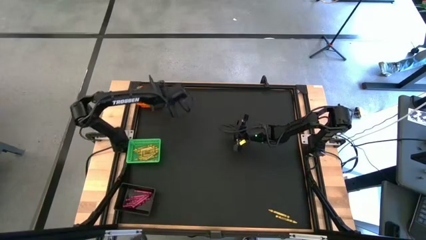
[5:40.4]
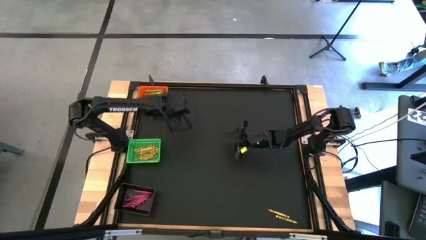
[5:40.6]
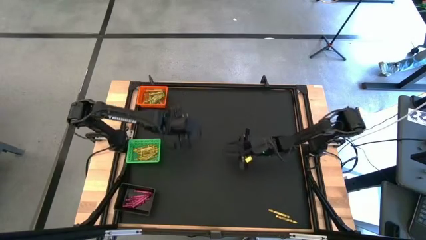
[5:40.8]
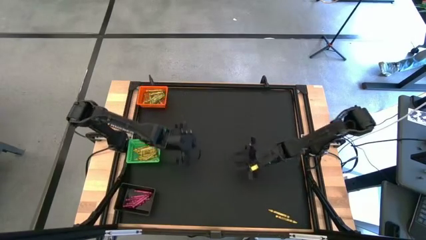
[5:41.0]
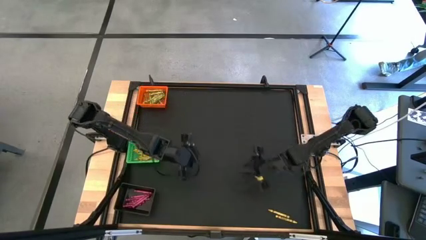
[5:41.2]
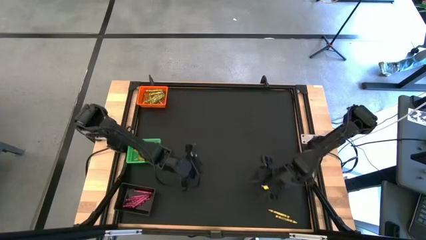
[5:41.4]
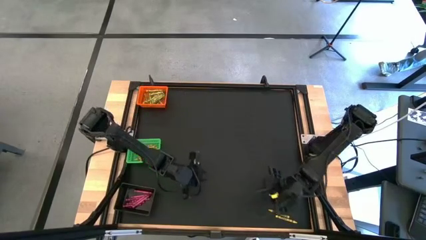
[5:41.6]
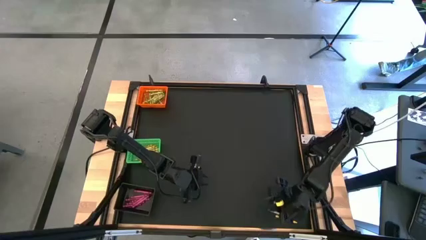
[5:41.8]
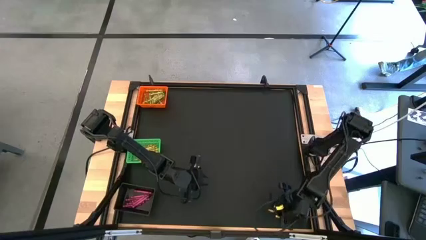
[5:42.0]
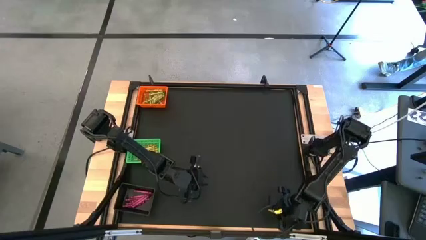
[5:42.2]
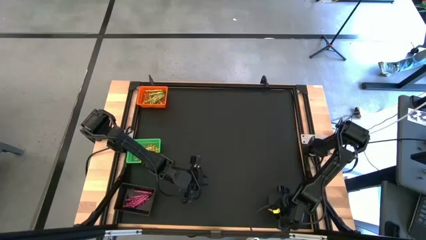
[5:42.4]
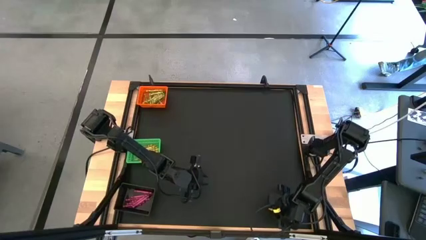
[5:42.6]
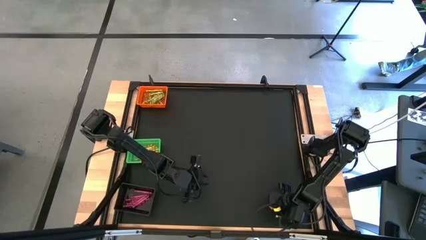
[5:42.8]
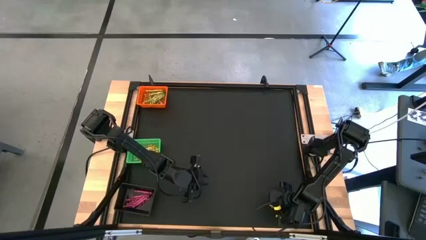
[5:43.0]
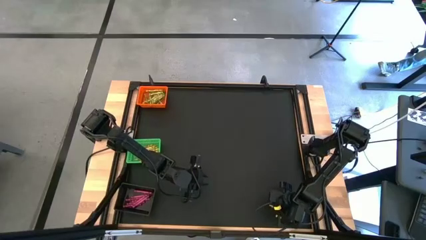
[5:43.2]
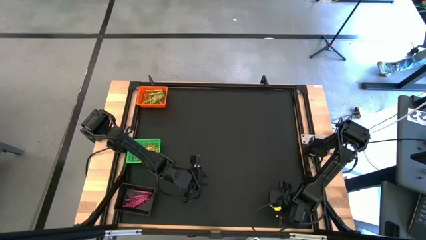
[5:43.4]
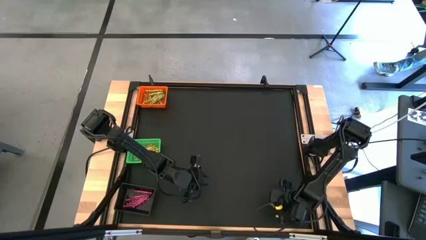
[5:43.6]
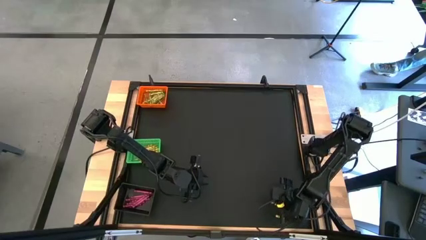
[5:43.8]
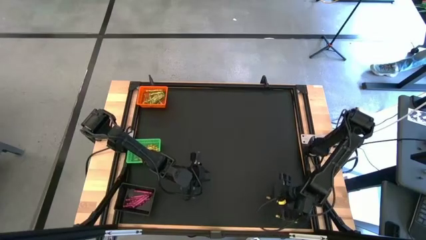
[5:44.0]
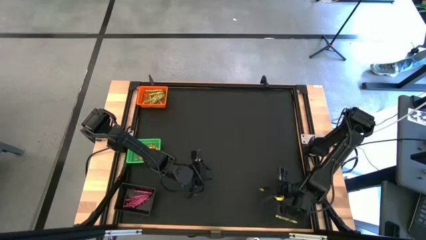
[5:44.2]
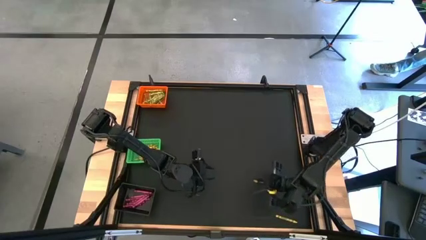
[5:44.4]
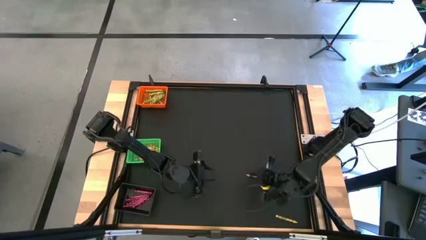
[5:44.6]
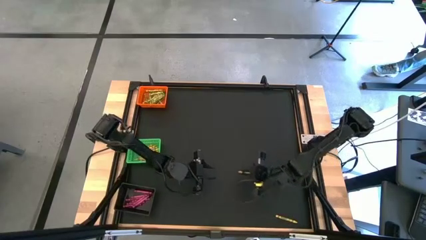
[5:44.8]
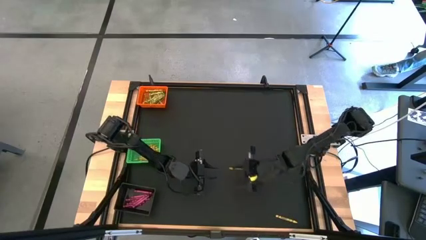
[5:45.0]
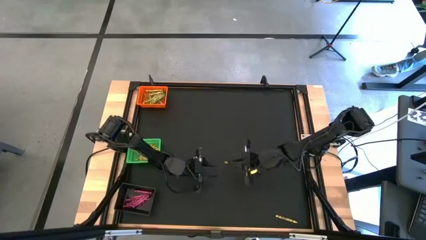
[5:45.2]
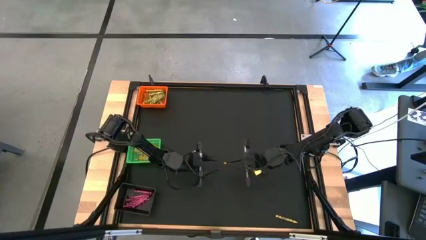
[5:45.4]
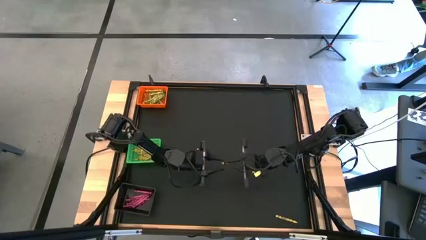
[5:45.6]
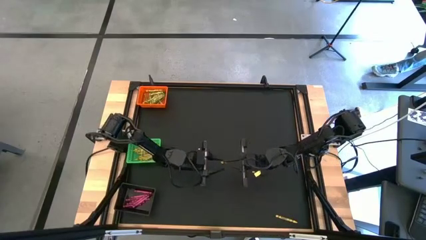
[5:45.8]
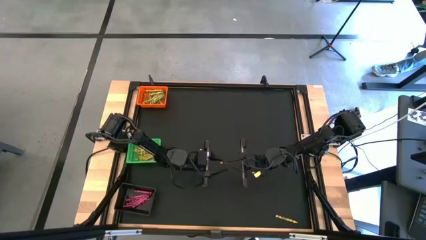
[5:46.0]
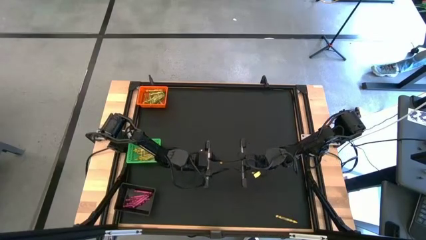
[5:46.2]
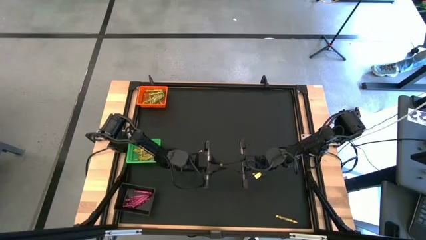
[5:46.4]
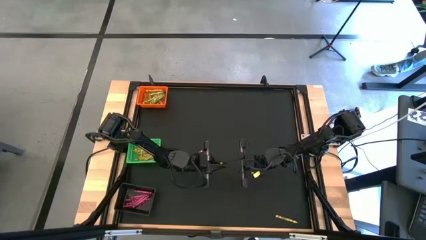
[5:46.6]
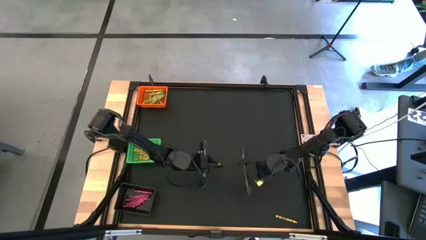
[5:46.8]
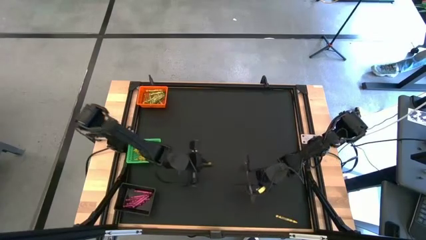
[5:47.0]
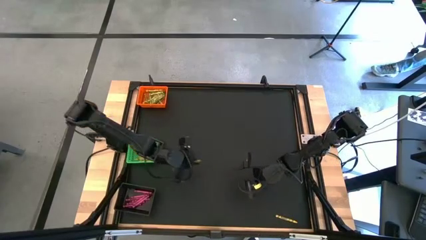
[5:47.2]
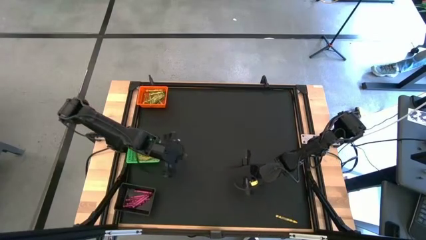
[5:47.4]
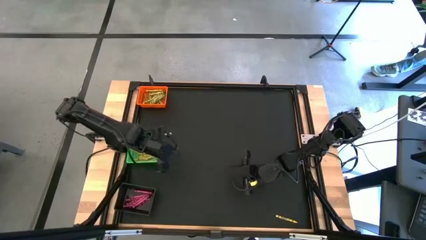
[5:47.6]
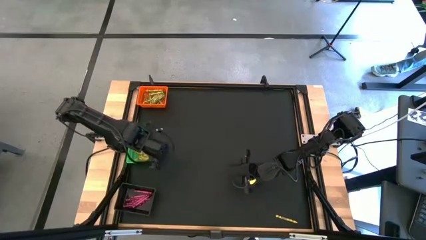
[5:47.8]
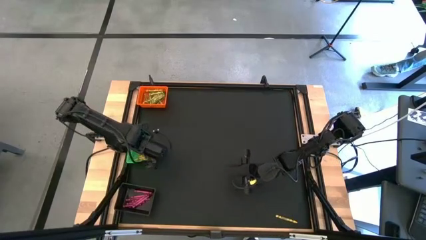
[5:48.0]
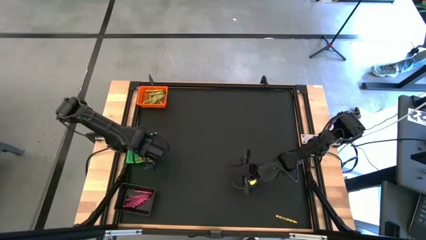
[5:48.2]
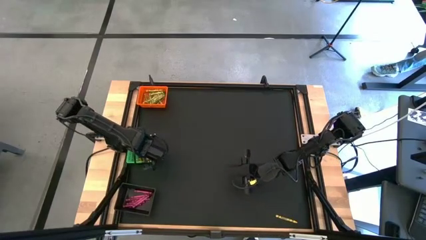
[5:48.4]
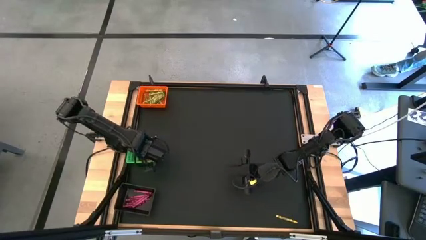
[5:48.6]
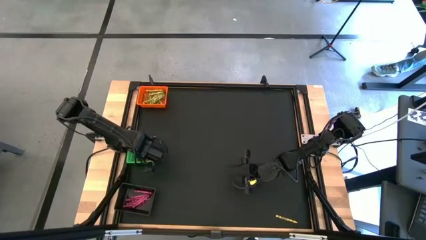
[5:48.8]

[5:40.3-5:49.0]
Task: Sort crayons
Put the yellow crayon into the green bin

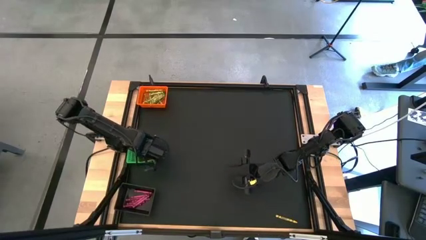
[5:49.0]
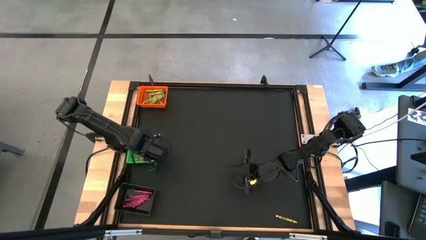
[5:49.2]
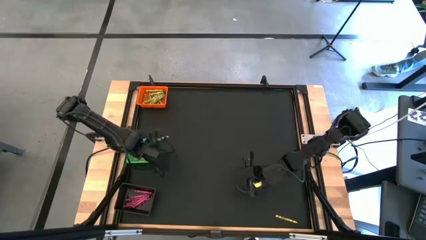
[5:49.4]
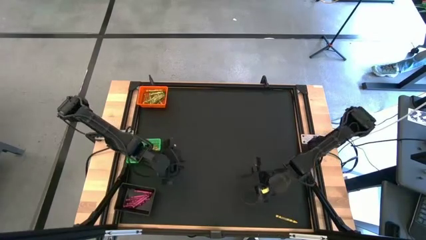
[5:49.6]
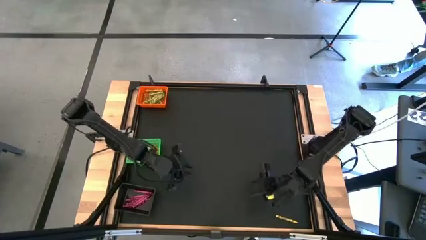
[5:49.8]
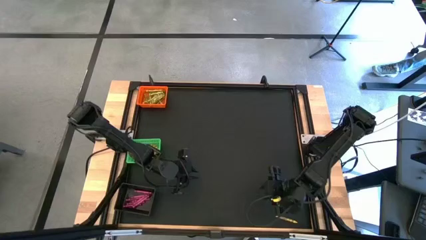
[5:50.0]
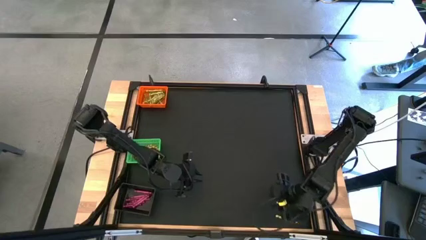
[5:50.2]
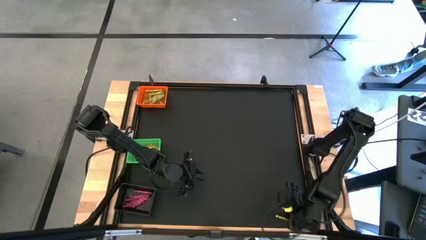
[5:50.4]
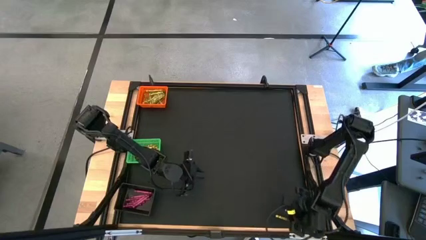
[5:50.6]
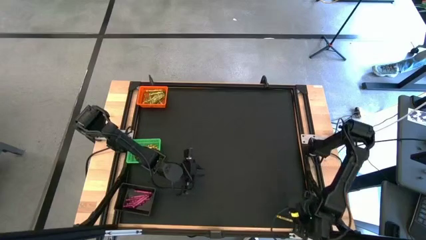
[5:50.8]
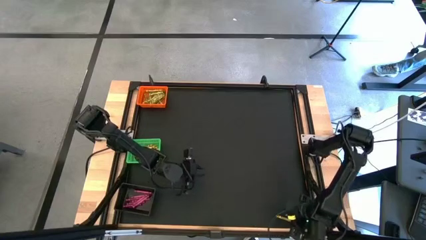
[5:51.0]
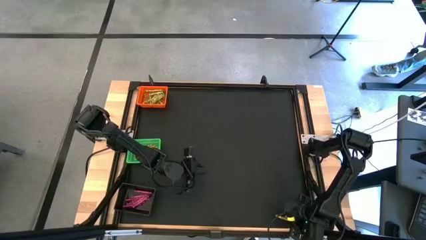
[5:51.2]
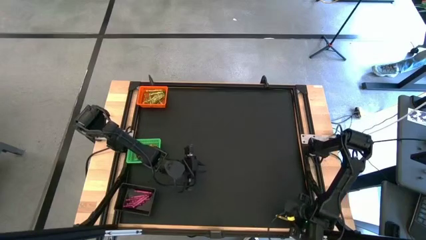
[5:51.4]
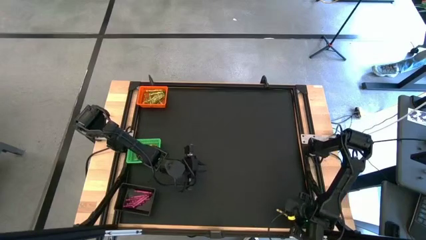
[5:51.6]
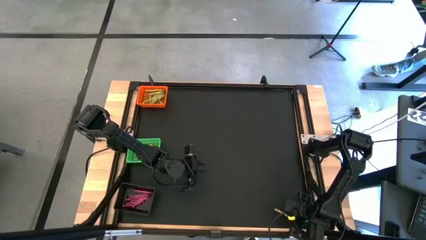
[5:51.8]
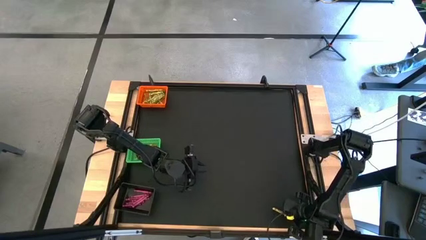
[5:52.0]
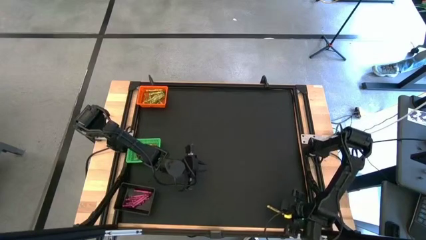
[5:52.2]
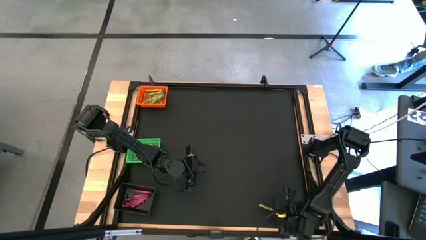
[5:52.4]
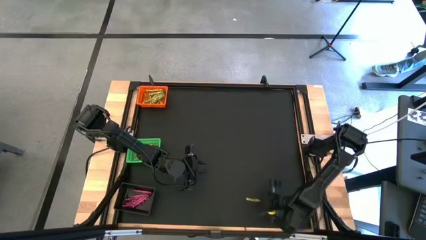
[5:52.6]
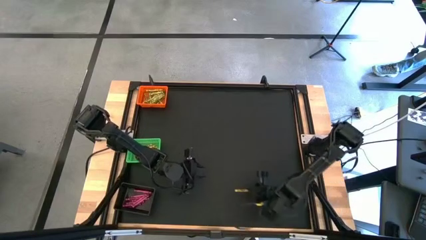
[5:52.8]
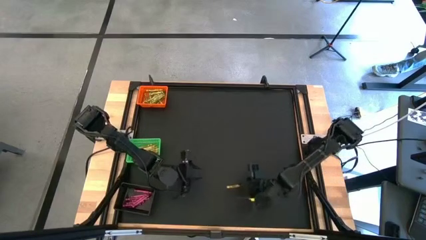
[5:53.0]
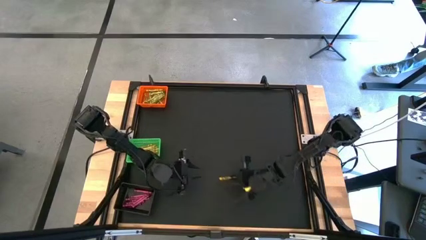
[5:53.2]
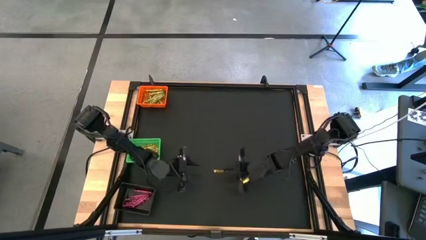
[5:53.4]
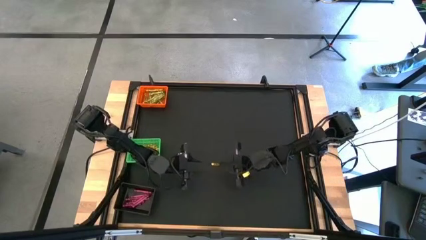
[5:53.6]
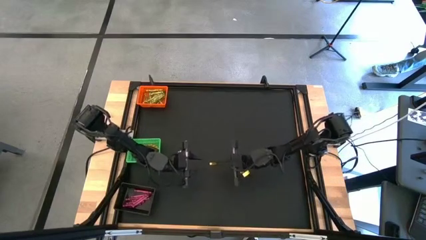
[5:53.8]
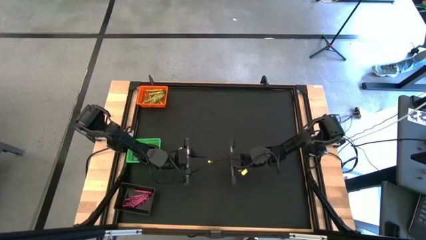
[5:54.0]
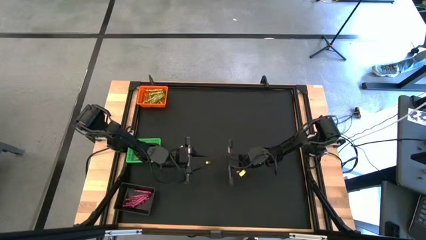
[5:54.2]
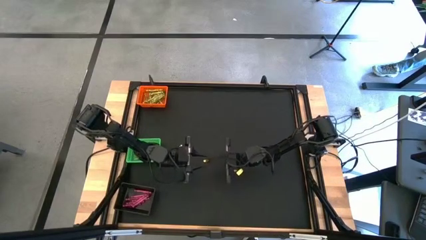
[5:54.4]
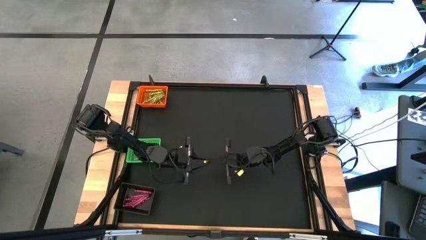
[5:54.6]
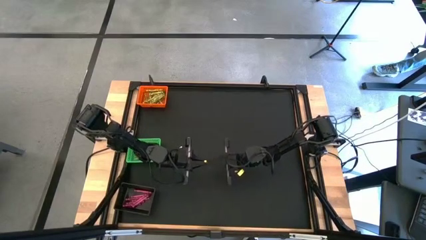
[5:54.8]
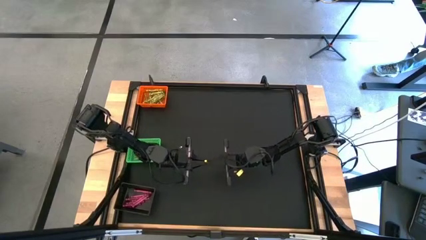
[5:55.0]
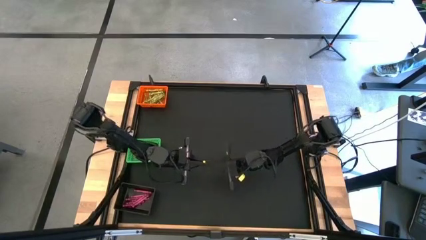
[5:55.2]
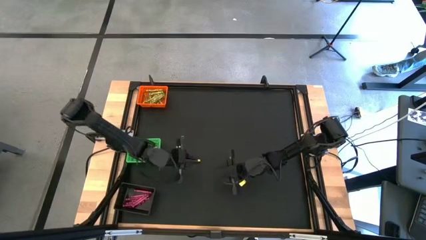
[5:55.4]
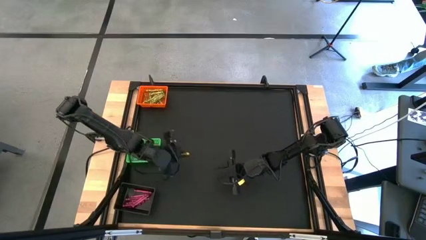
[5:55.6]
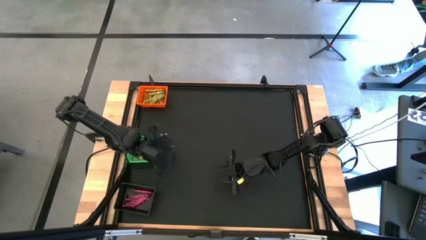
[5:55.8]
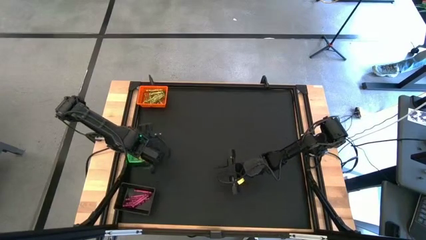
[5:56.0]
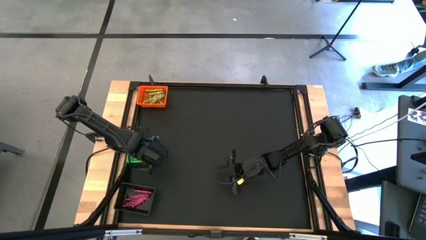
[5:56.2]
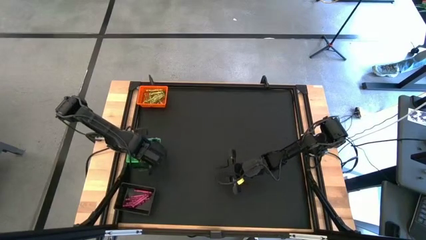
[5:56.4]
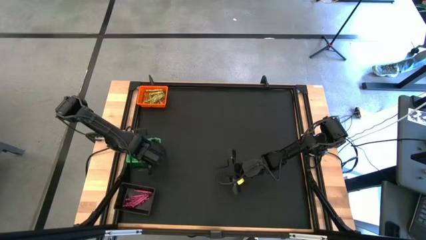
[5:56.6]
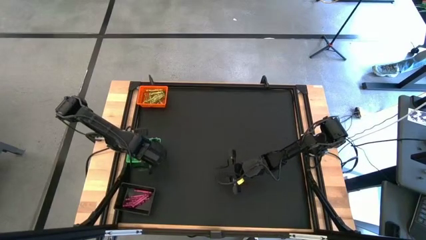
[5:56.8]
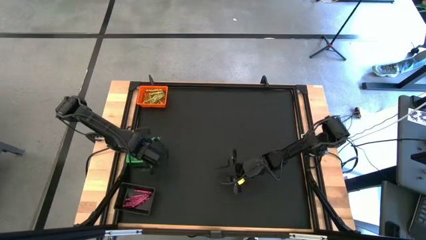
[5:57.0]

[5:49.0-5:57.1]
Put the yellow crayon into the green bin
